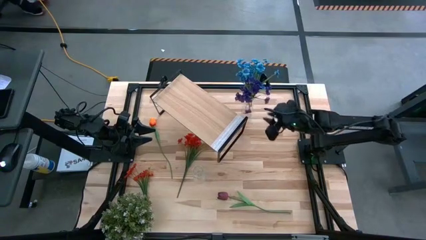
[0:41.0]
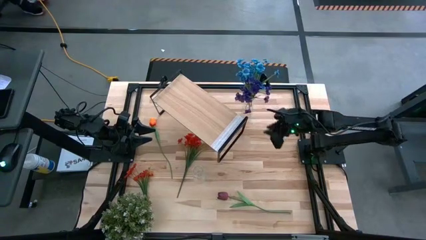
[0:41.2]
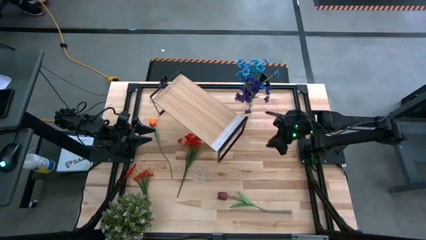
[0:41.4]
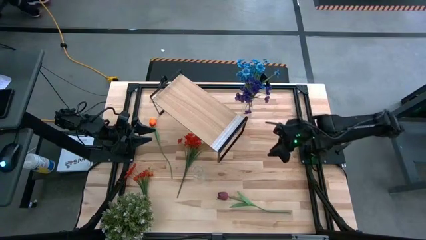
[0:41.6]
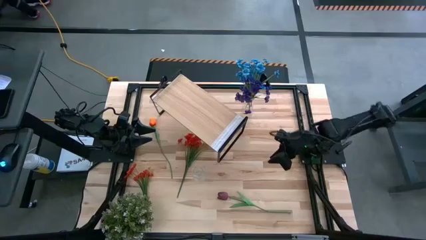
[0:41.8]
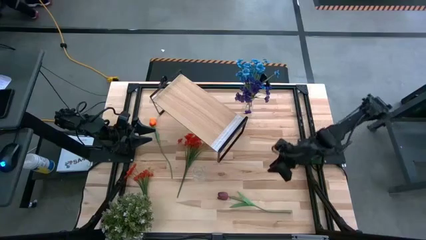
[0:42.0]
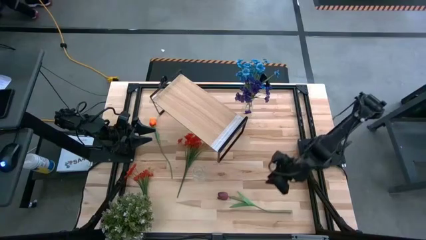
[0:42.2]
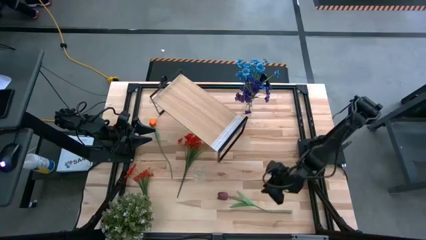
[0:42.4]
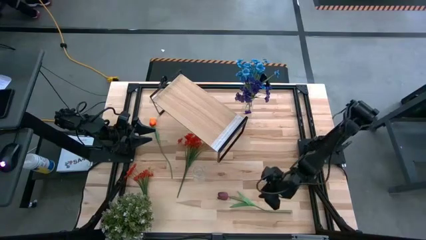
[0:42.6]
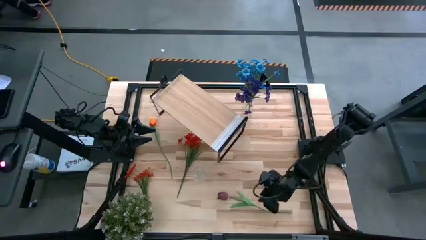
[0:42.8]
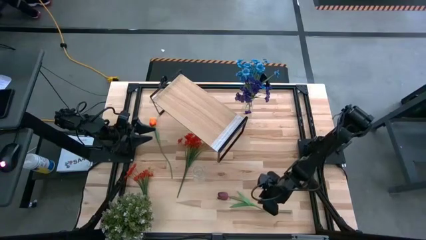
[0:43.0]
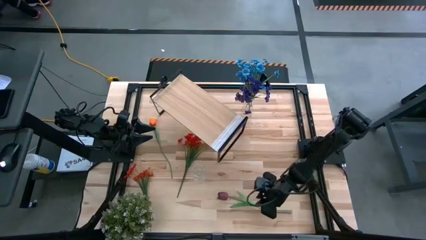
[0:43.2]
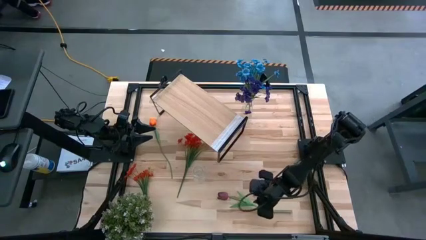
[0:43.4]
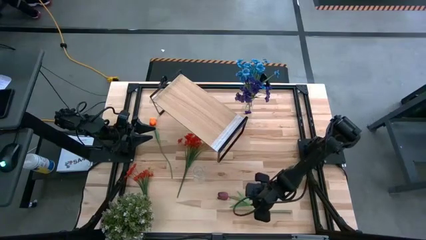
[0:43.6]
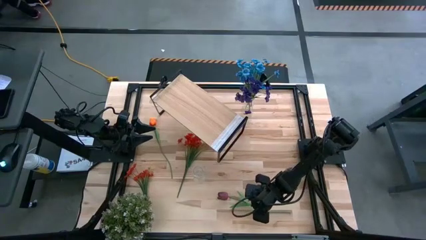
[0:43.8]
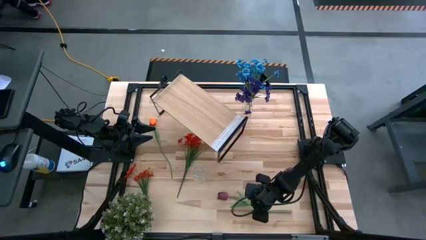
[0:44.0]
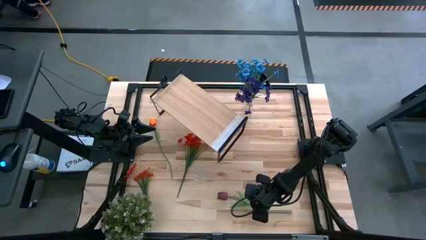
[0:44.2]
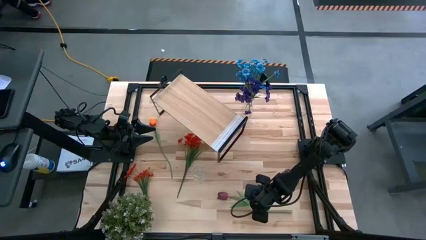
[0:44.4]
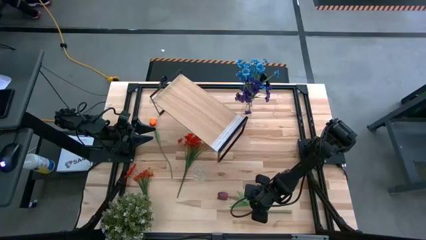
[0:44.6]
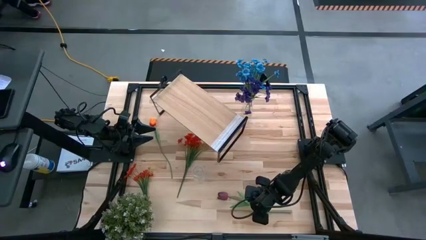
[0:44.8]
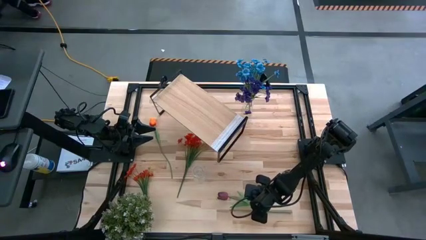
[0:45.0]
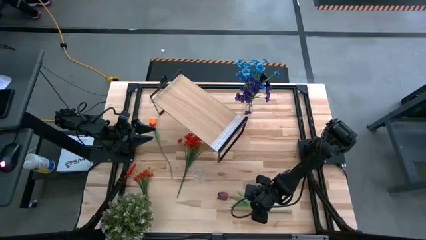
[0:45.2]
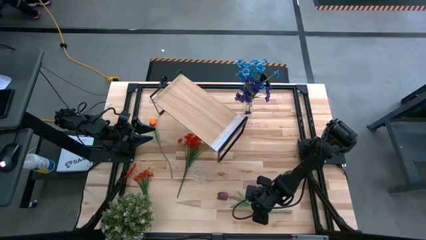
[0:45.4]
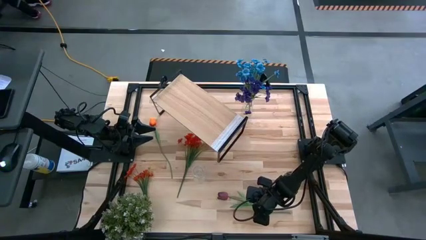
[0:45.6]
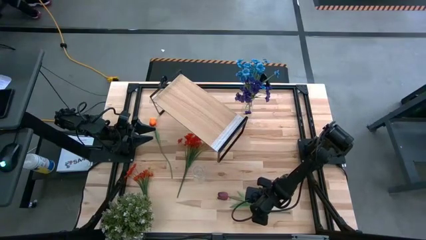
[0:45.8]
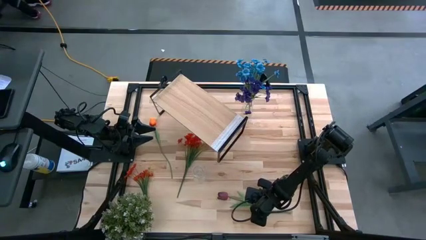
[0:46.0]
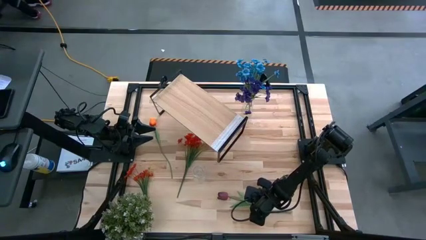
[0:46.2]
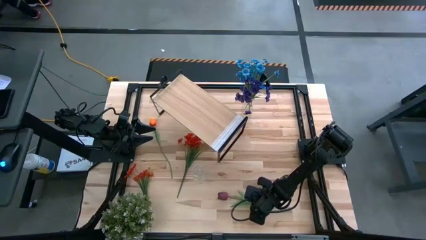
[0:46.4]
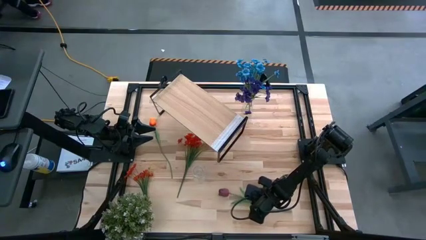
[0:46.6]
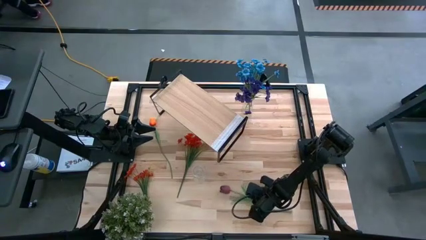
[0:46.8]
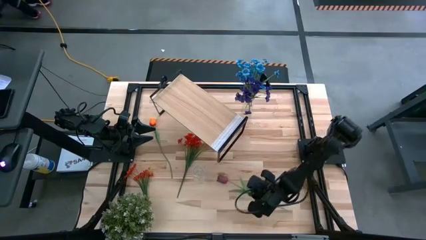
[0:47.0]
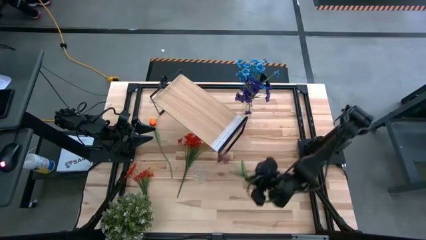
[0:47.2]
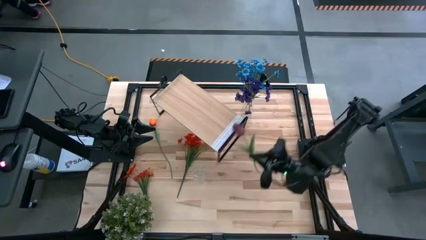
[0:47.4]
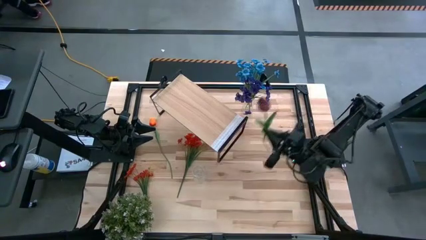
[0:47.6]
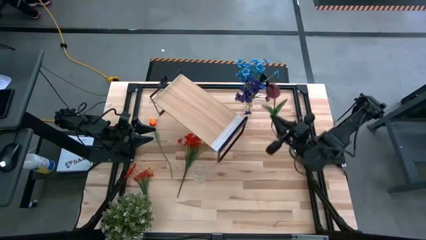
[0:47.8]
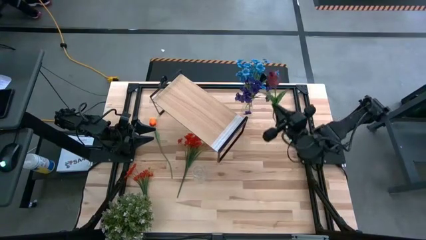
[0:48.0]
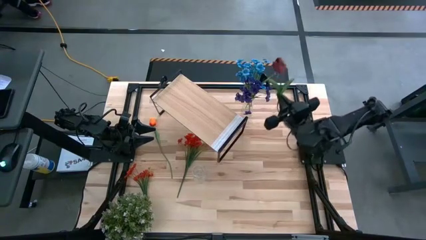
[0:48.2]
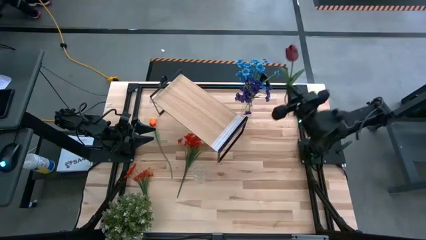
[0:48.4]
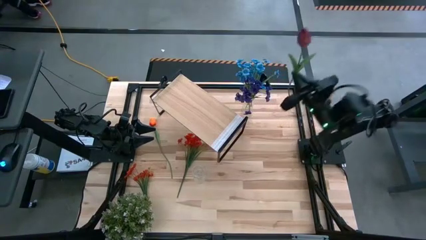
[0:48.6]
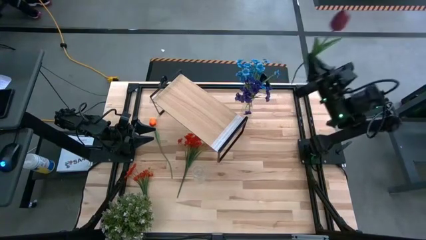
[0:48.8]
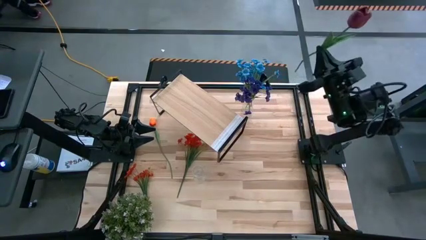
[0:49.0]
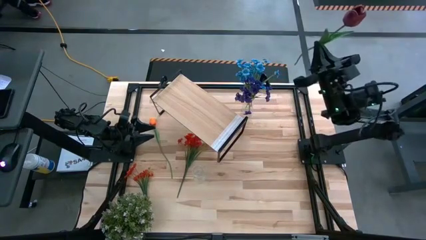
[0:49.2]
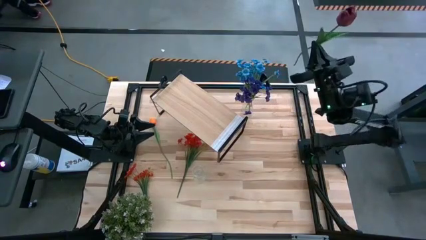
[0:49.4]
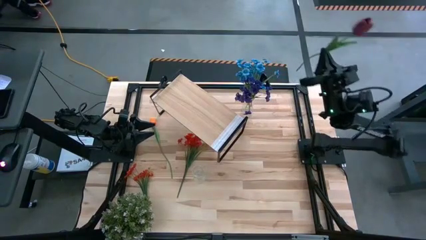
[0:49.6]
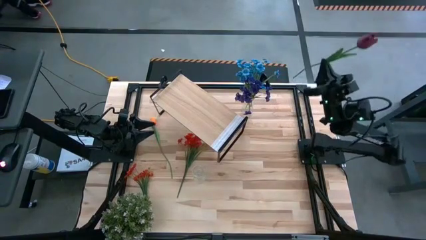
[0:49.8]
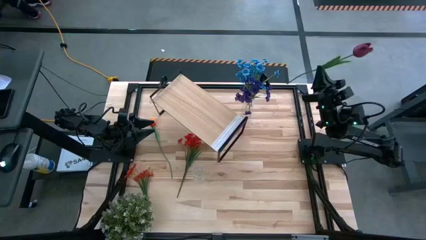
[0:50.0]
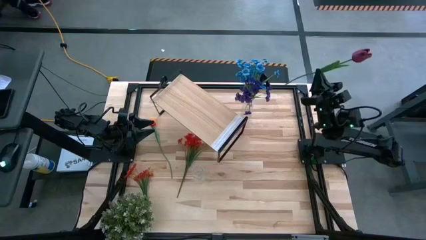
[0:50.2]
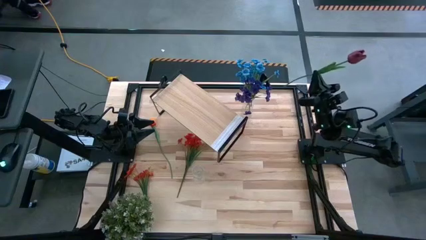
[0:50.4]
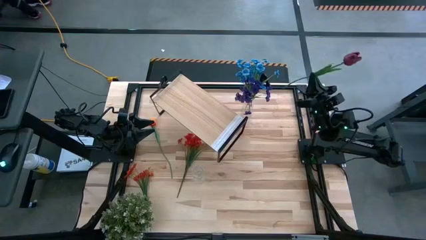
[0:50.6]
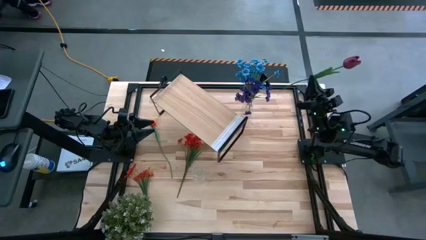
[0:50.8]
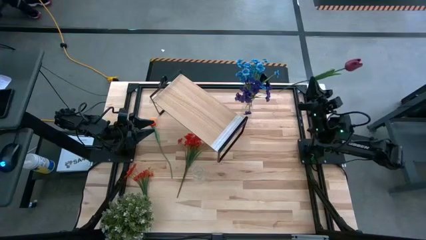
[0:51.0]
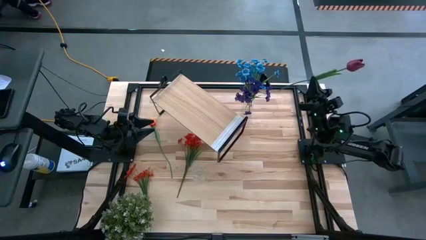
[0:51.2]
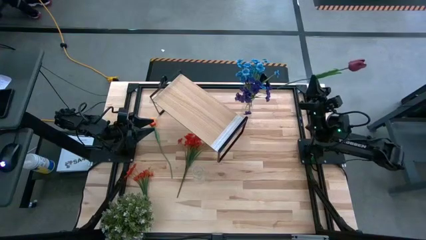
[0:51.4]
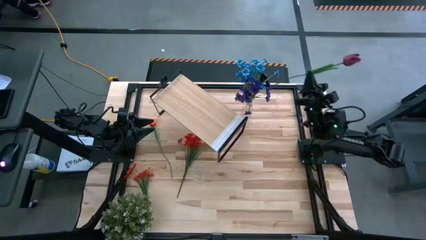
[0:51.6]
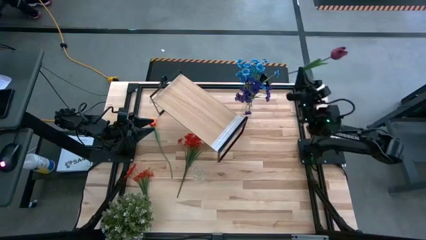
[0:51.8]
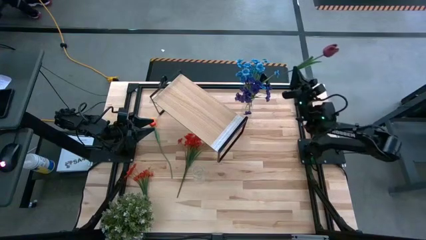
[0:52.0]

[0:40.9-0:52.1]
Task: Pick and place flowers into a vace then onto a shelf
Put the dark red flower into the top transparent flower vase
